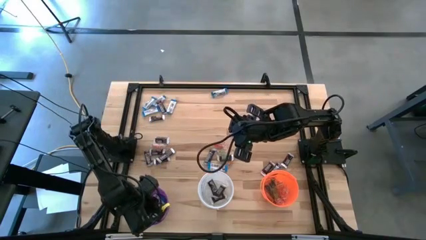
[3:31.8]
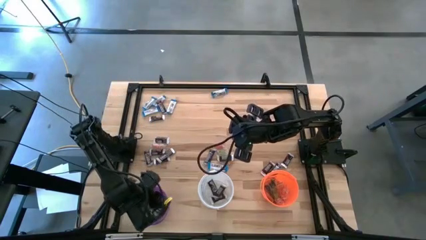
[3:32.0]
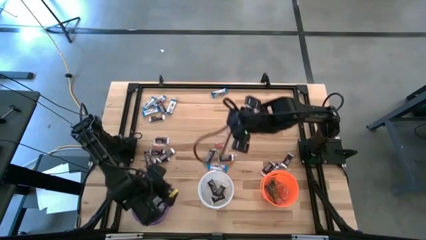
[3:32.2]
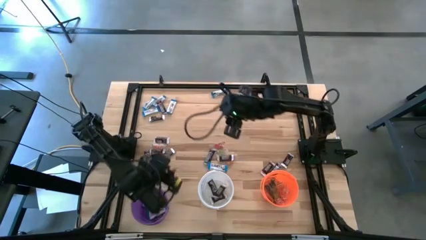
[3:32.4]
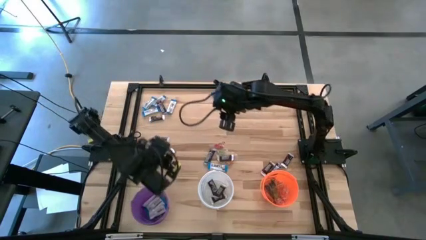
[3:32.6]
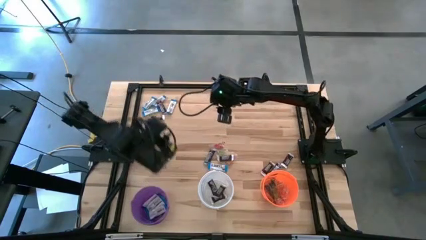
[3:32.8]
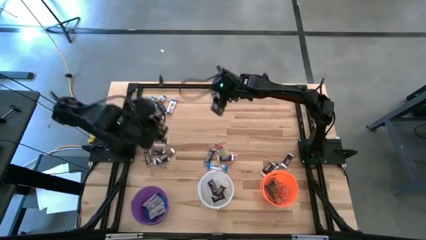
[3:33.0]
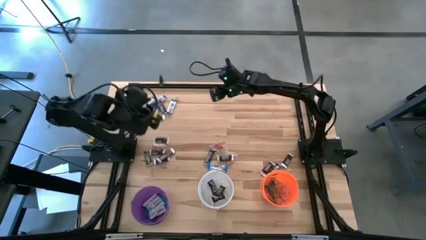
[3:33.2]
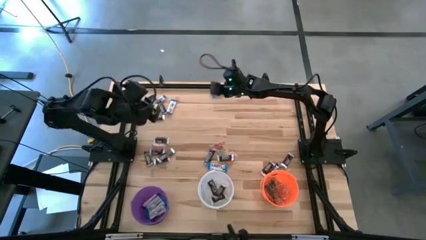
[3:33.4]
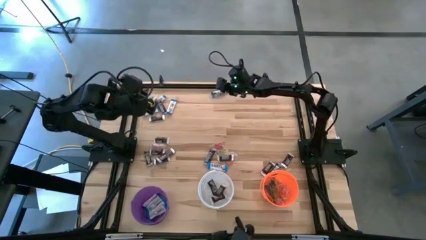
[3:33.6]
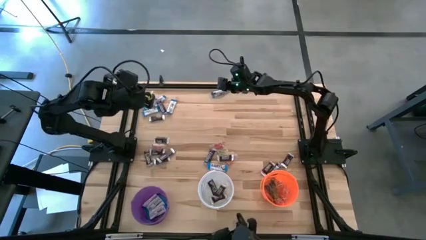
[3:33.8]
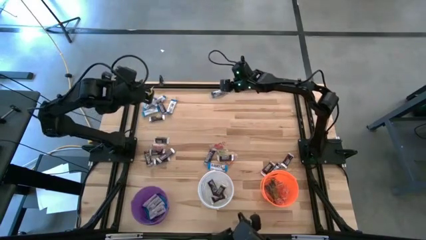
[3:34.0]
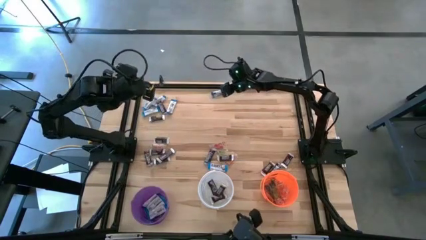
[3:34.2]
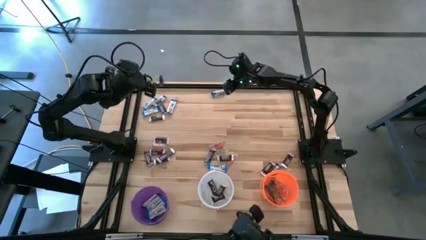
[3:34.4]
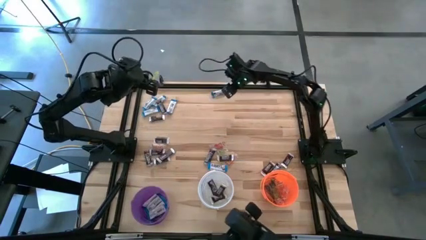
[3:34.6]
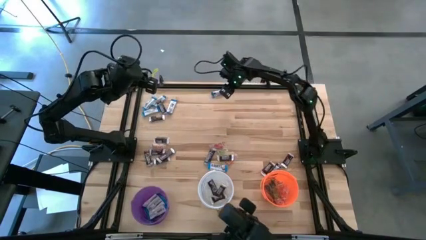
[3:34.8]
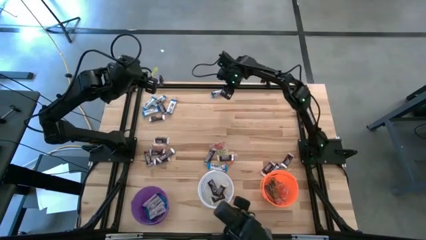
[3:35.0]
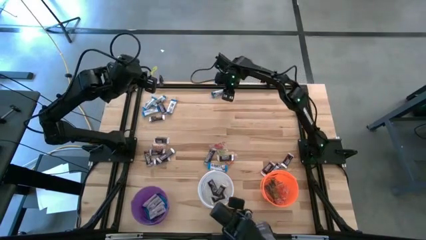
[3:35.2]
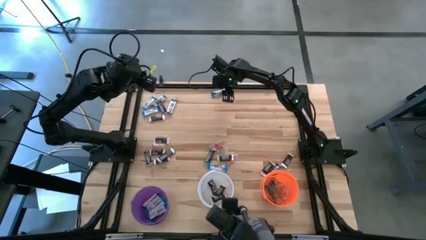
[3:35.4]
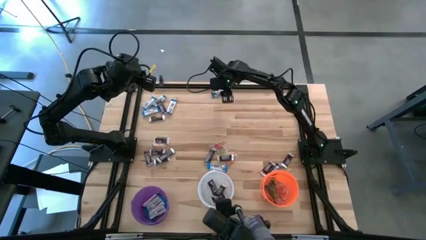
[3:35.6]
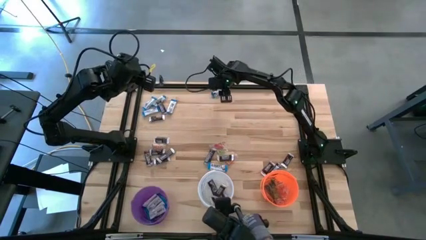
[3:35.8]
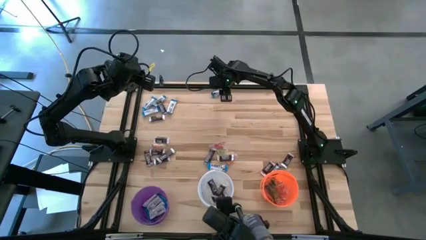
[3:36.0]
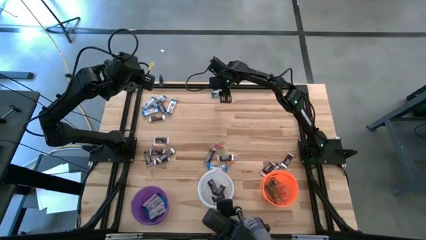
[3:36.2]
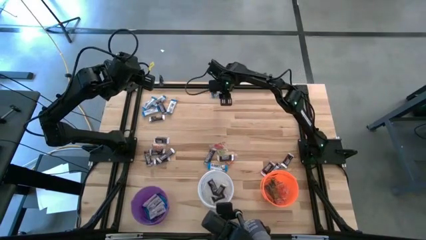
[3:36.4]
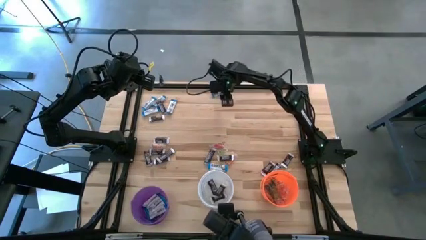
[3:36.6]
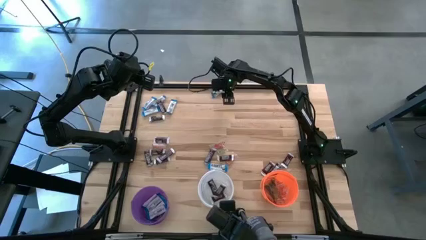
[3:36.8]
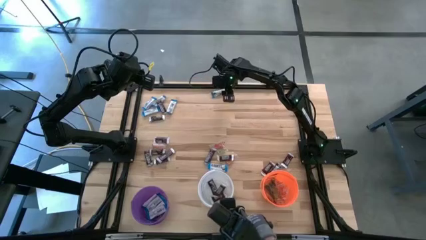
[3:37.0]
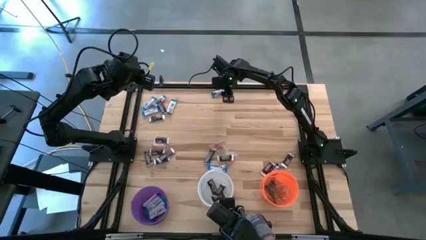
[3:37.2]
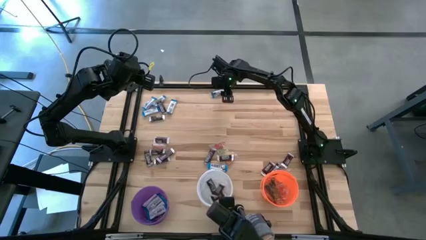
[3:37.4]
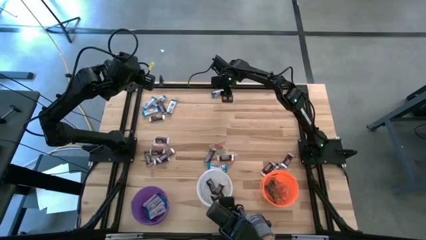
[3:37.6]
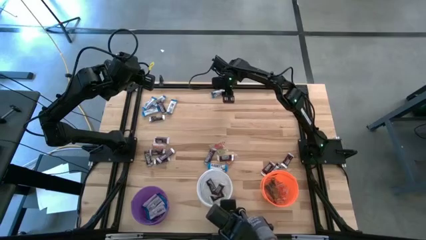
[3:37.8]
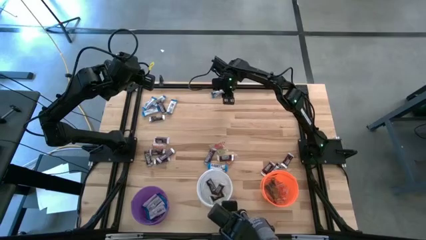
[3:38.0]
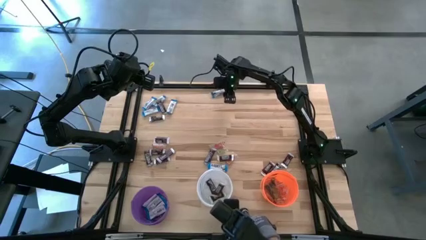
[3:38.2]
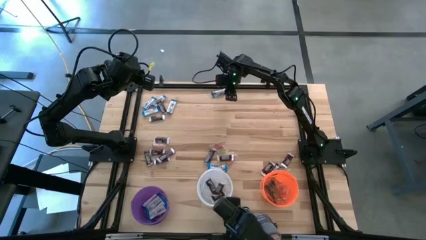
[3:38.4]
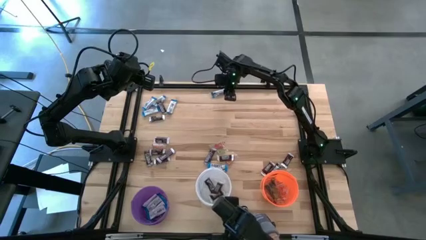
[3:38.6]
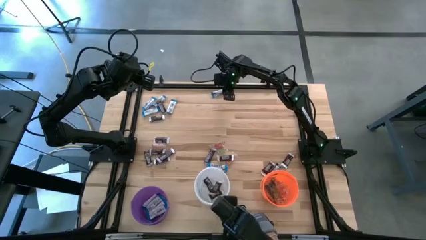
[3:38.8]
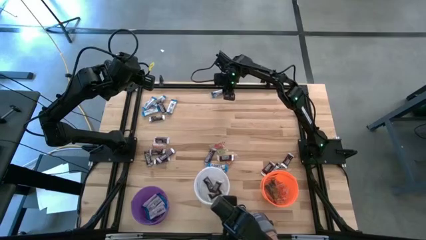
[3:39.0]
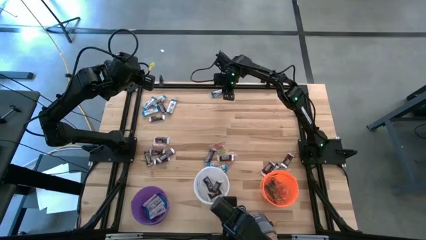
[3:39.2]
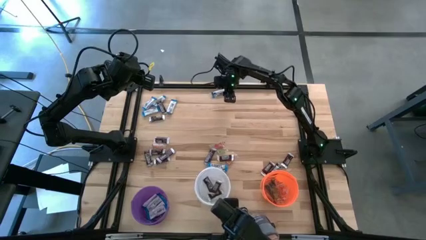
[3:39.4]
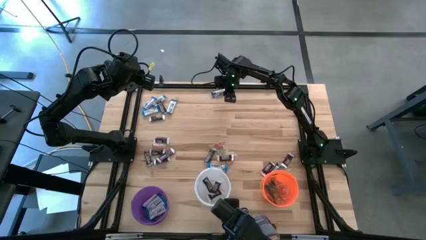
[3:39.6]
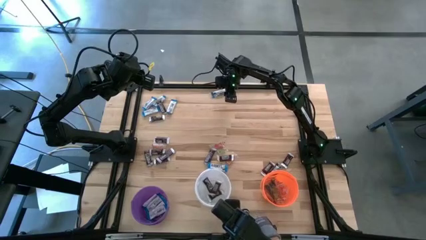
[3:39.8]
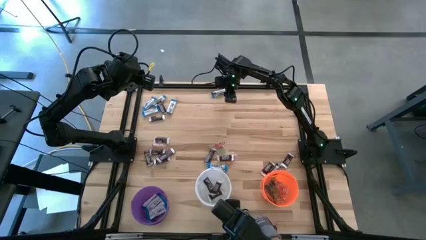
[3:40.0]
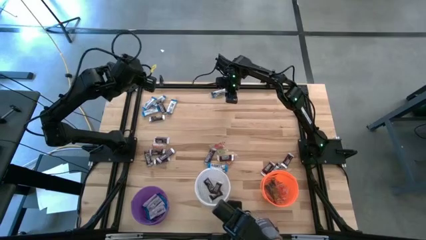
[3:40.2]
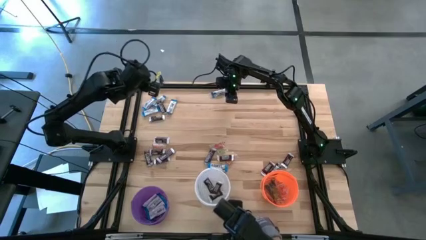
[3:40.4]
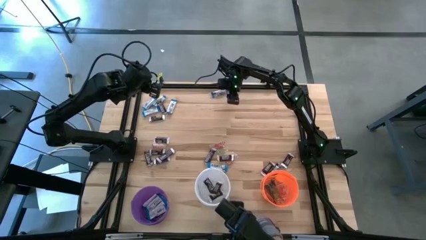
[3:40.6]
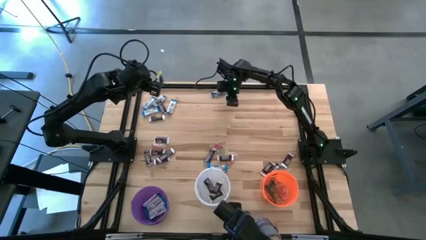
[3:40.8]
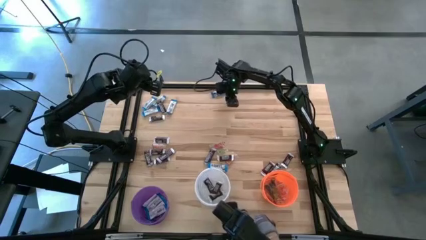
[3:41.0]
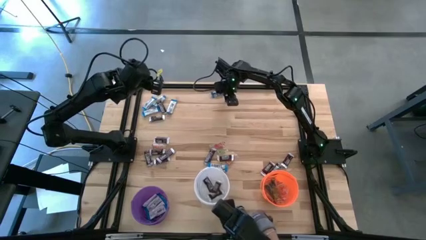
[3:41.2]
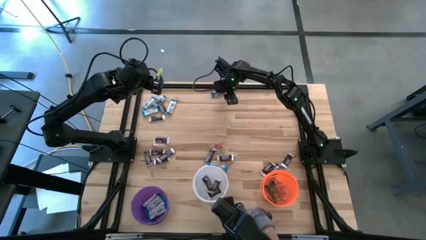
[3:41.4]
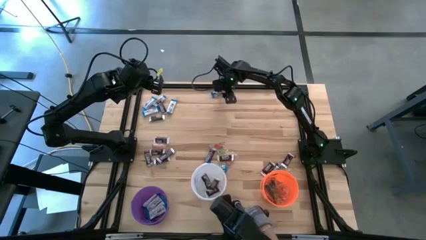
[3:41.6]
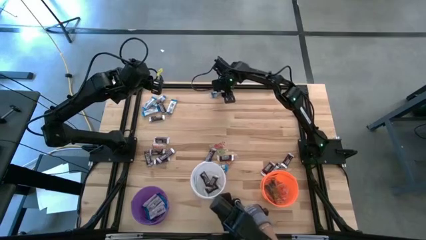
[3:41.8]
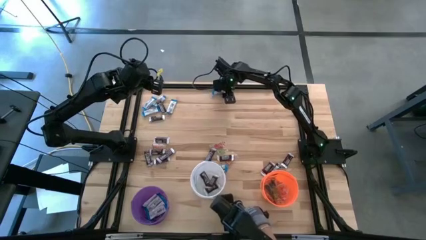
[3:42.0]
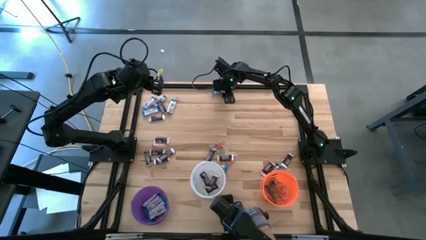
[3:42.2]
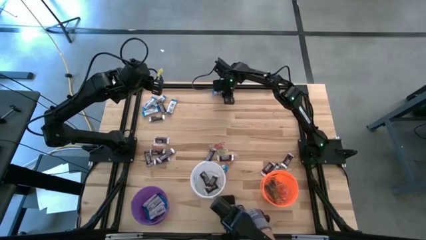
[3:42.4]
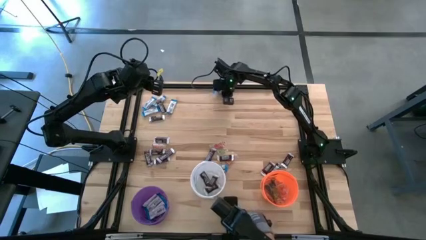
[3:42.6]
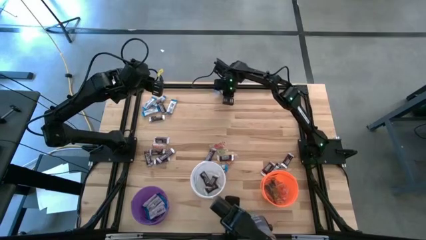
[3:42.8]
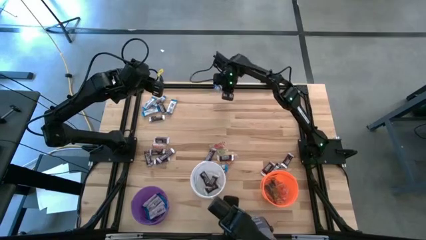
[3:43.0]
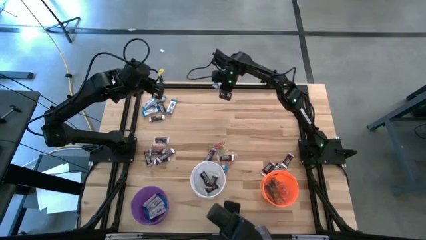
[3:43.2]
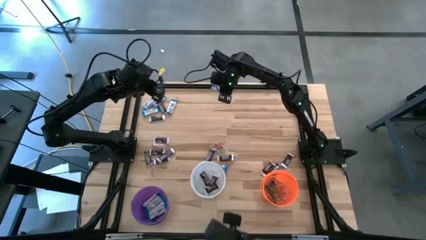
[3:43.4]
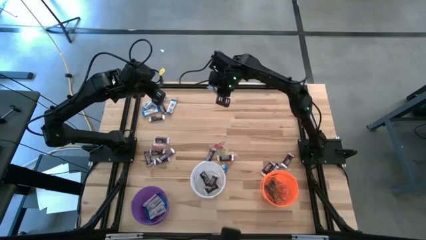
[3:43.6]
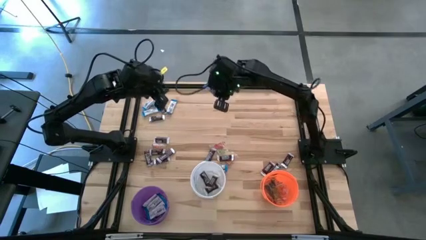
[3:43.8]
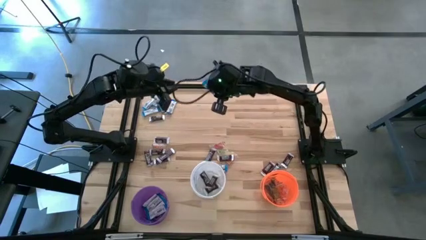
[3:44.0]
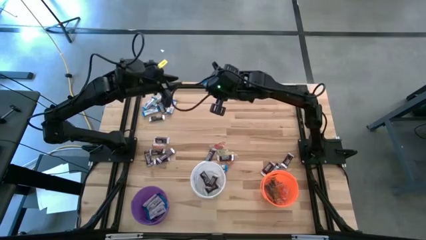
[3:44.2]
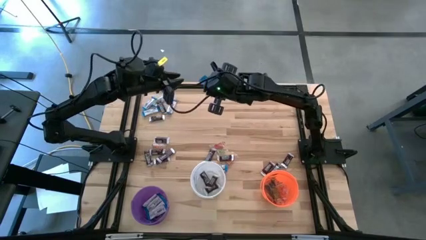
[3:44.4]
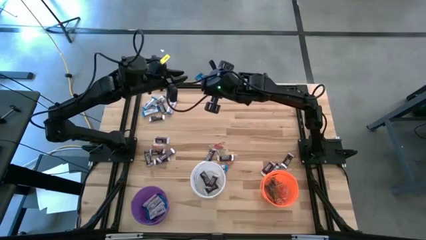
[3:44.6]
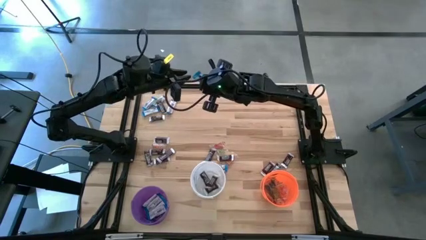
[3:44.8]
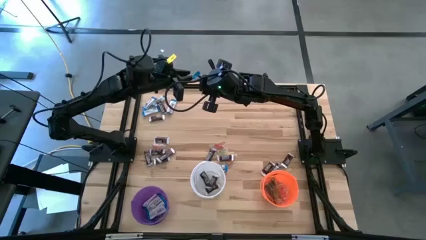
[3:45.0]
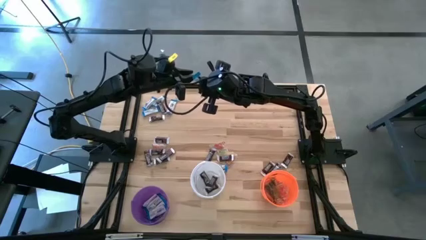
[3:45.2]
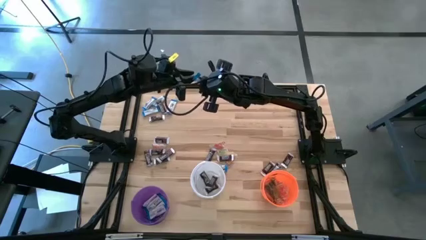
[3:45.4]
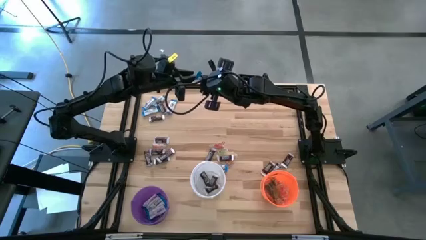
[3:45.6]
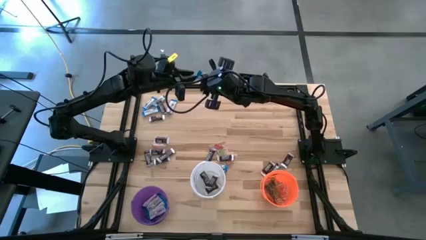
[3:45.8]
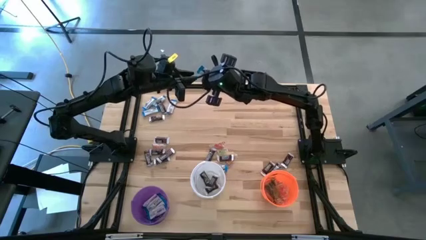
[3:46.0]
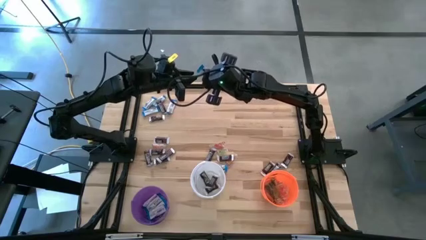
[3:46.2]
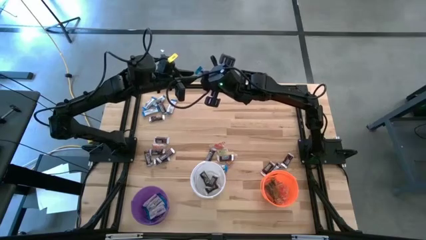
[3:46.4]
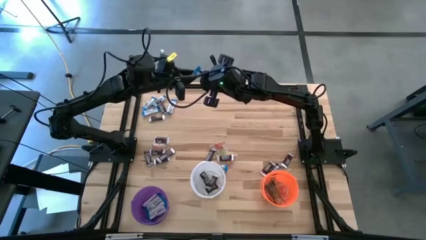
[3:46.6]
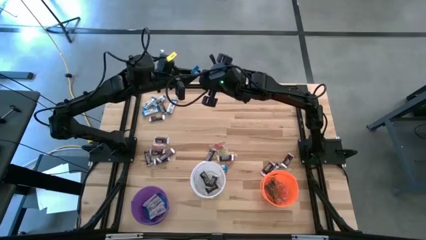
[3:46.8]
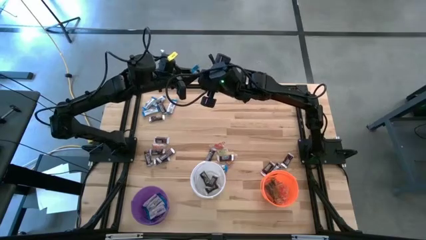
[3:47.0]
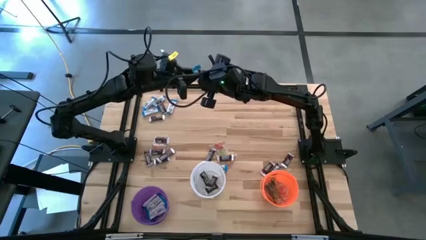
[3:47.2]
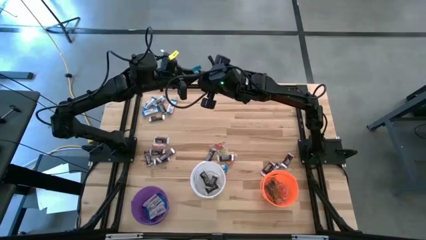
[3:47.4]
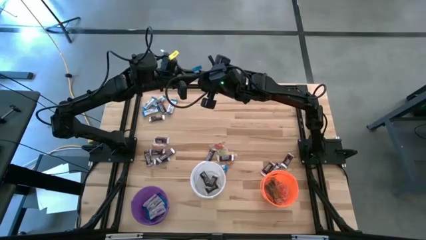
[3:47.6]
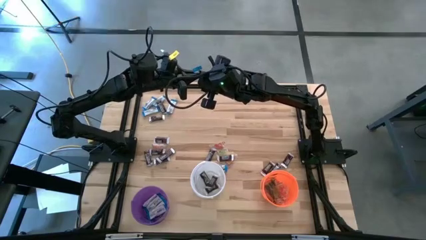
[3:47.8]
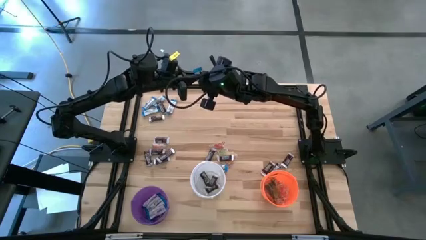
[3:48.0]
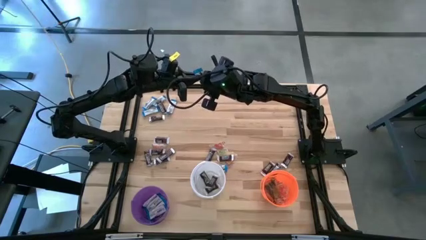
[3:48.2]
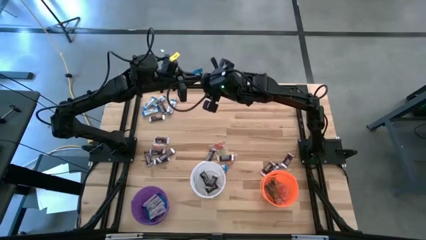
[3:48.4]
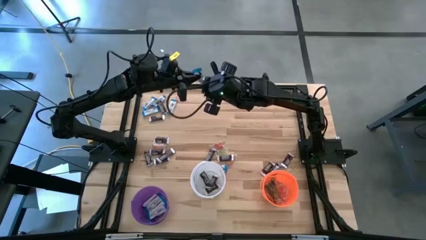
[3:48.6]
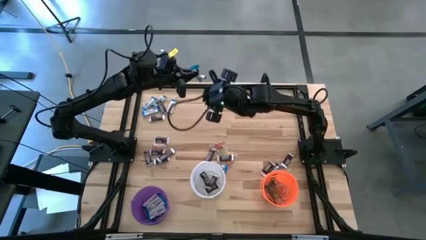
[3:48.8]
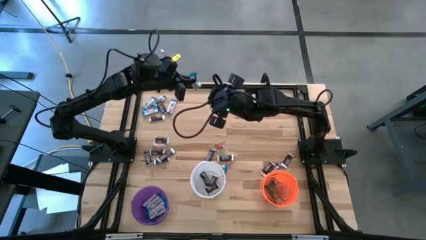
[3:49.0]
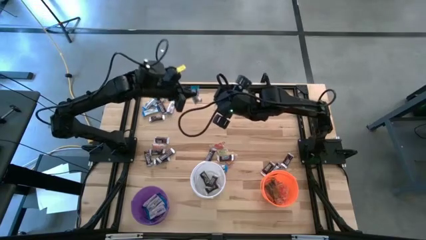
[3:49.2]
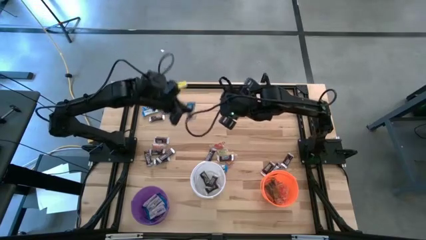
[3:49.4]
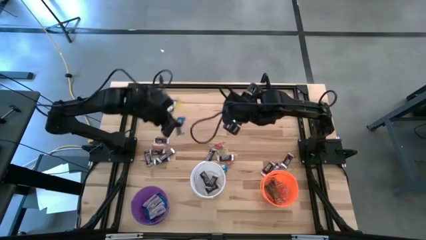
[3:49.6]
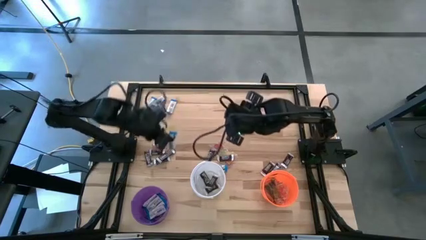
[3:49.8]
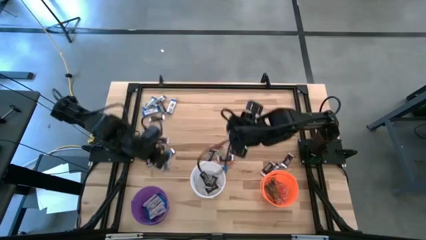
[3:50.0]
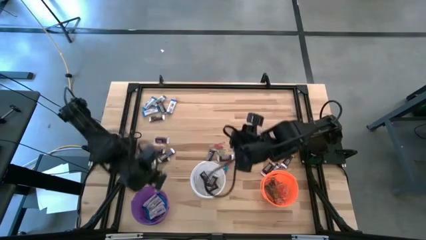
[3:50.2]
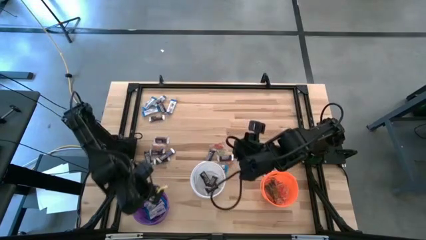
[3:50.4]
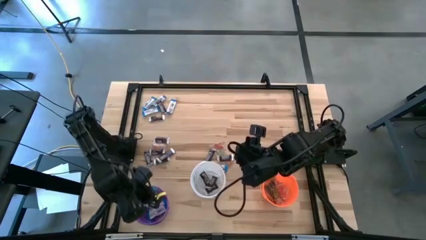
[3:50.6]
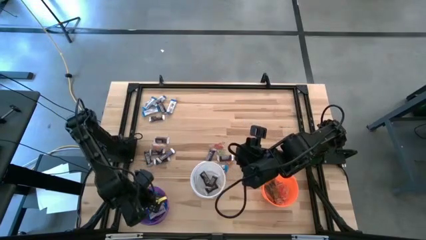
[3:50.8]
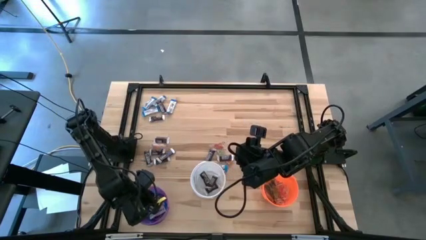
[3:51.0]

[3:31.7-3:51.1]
Task: Sort candy
Put the white chocolate into the violet bucket
